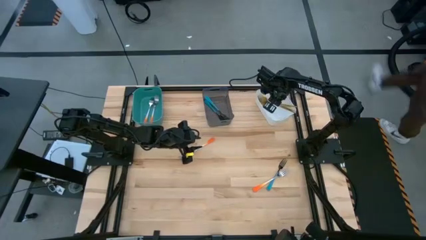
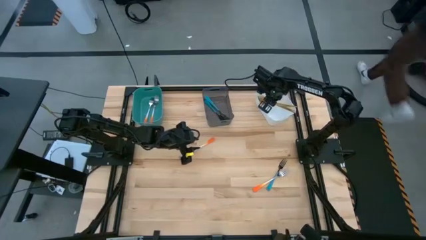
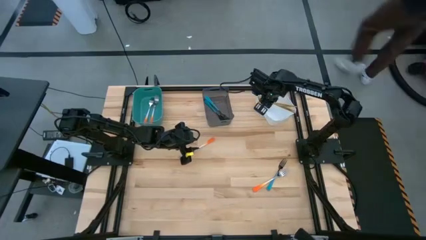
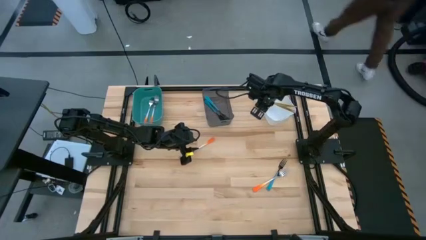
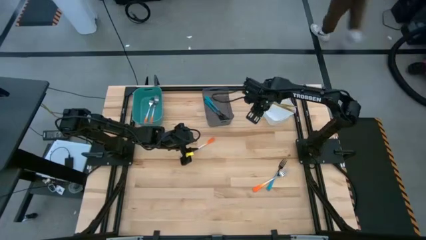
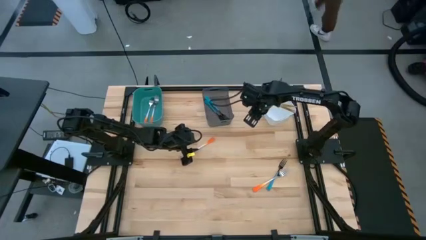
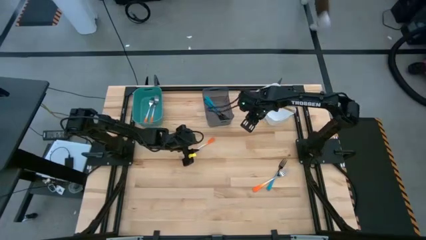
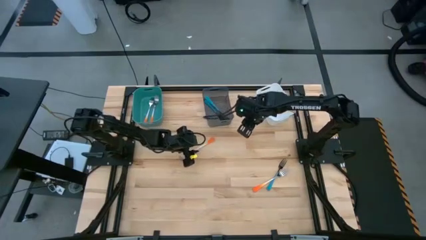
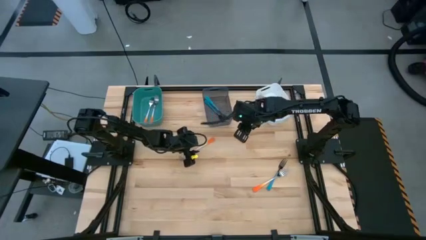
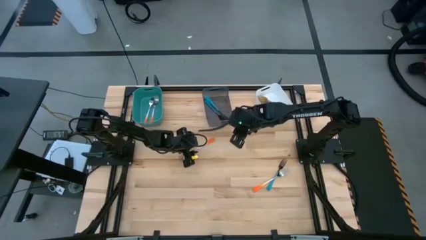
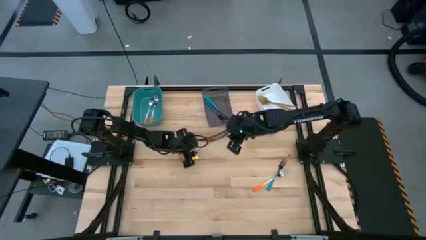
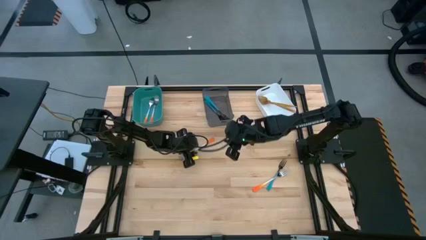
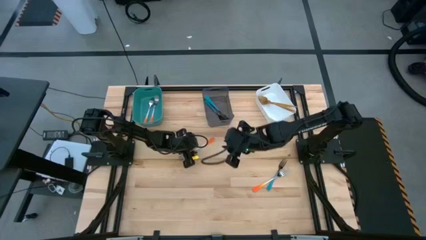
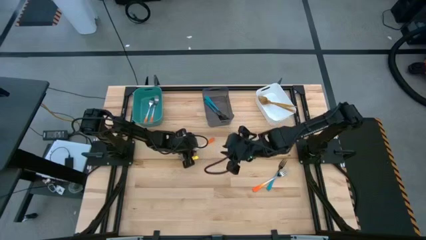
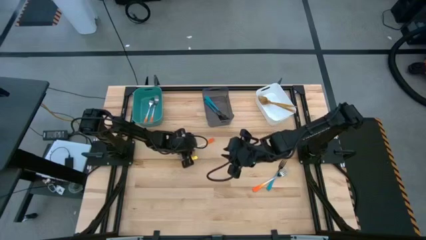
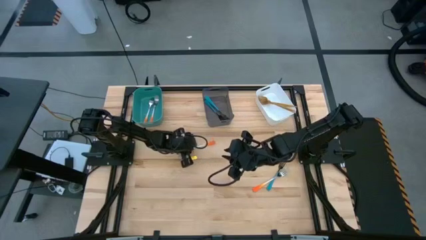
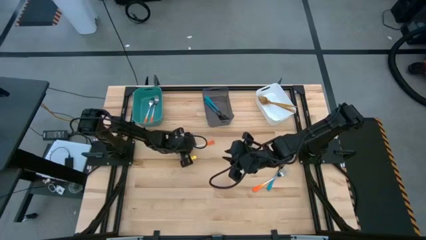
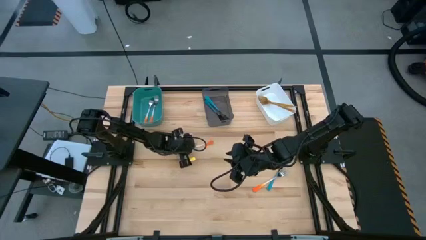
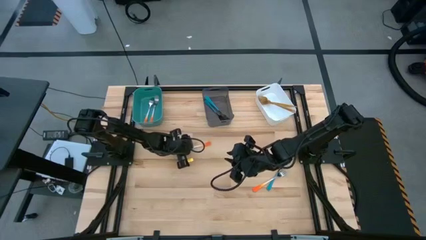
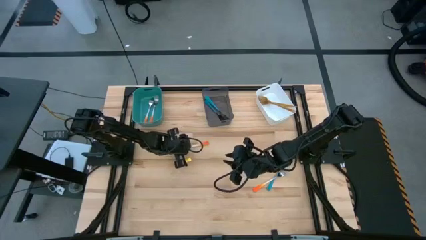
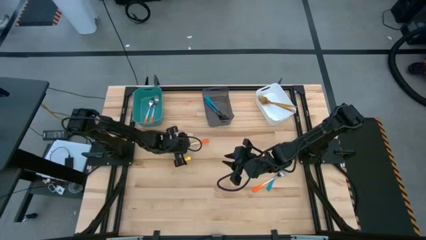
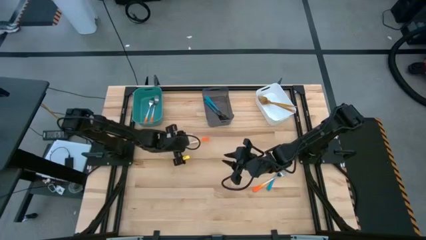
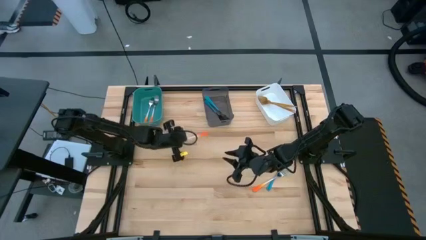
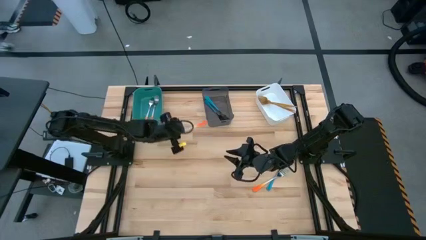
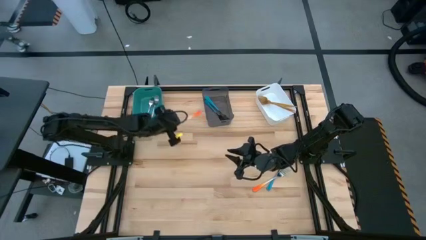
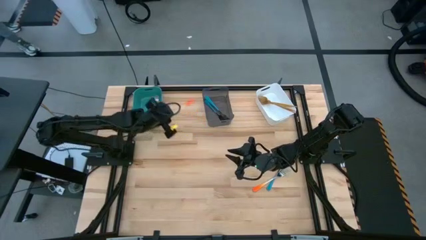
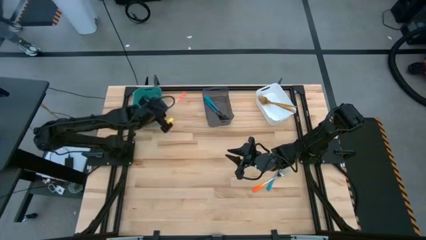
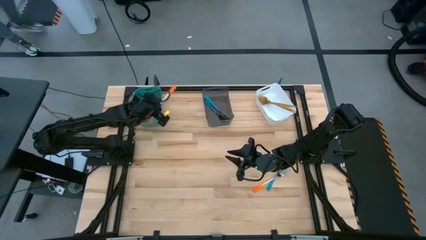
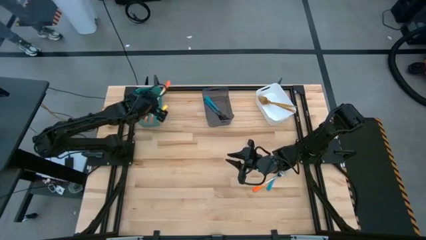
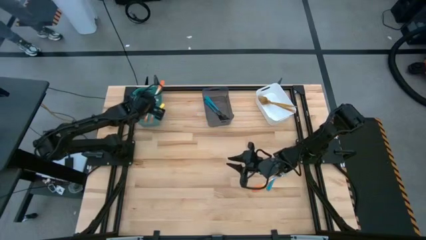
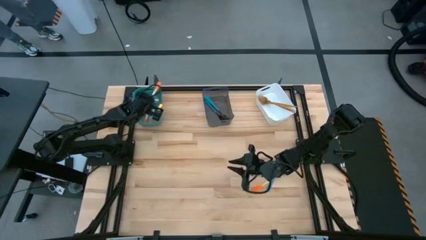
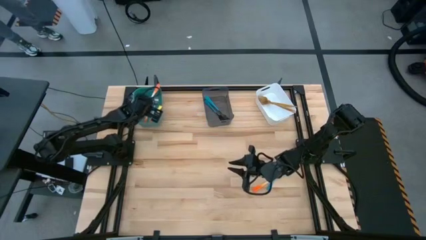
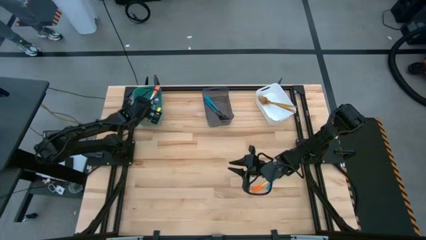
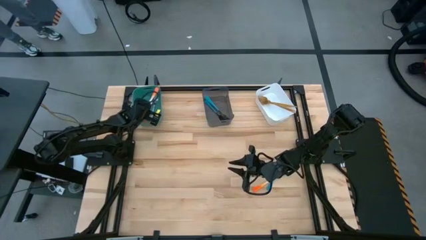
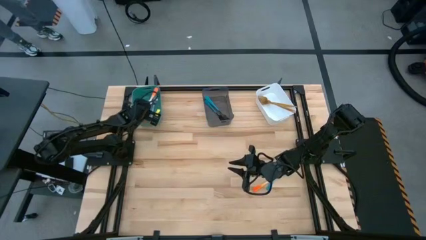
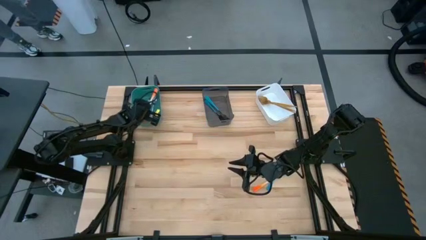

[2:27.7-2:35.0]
Task: Sort silverware by color (type)
Put the left orange fork into the green bin

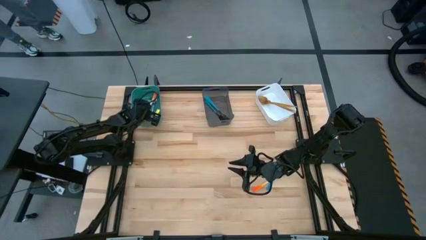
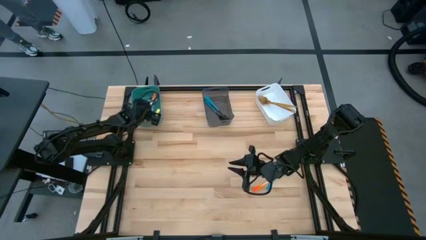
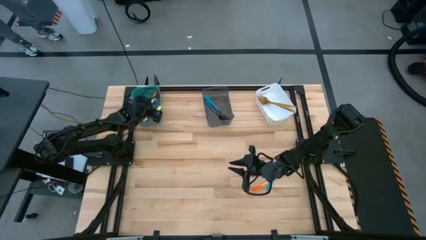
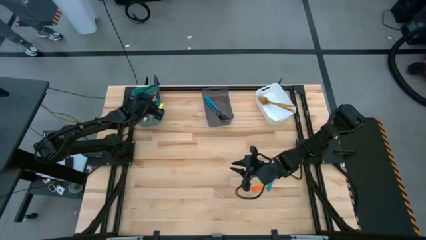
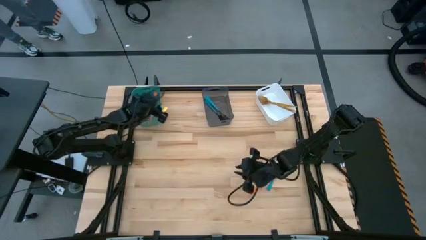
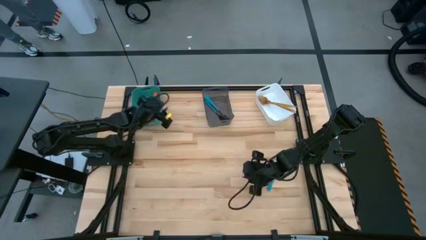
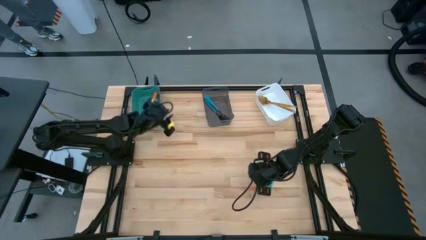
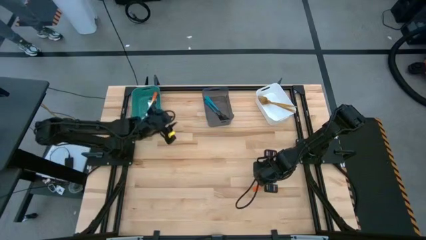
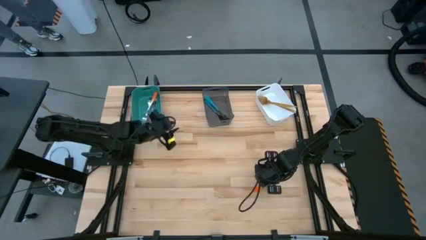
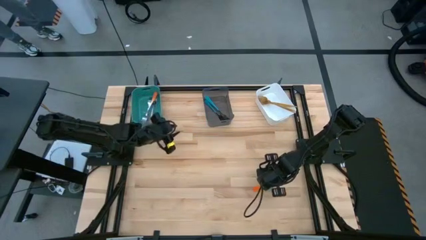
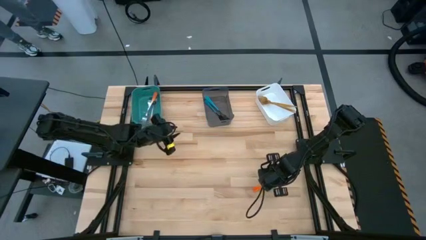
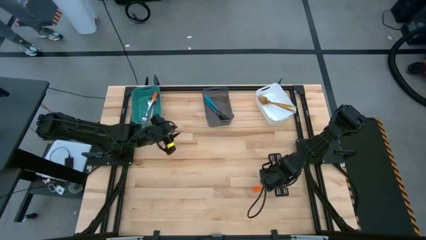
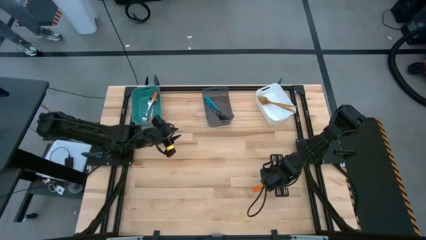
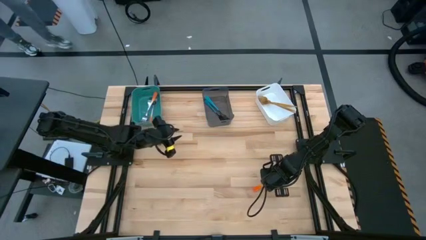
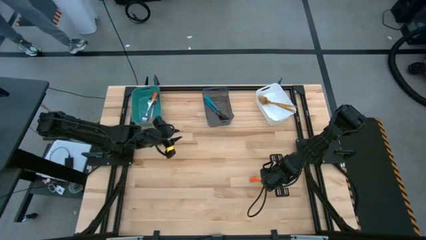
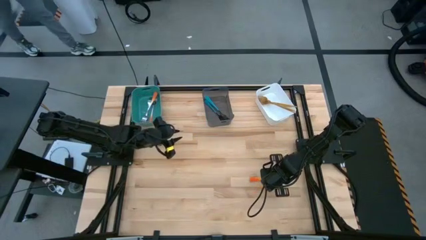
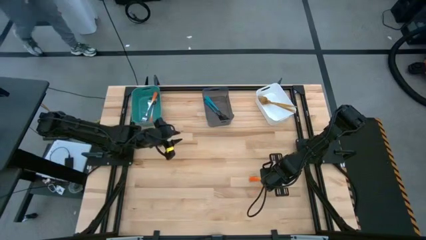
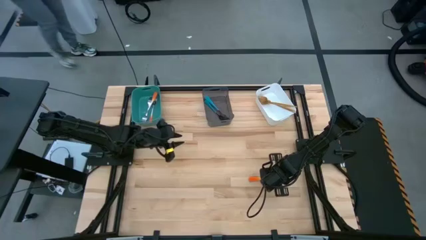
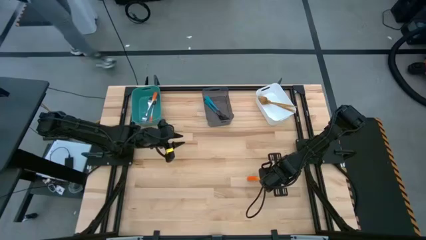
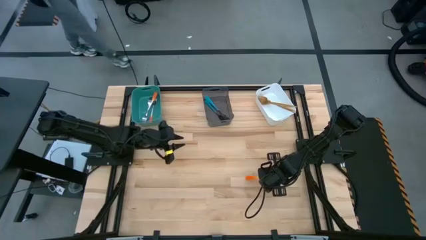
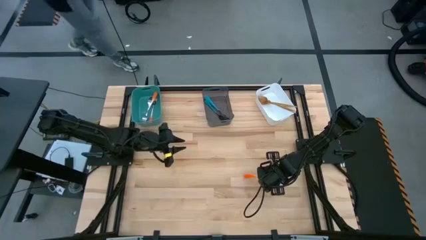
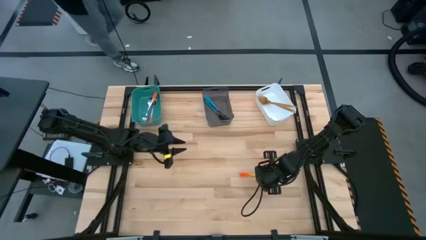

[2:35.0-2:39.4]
Put the orange fork into the green bin
